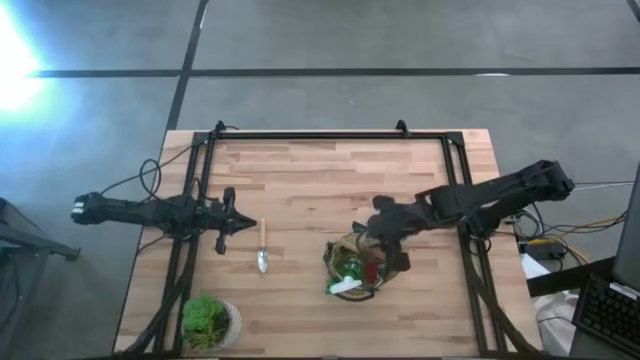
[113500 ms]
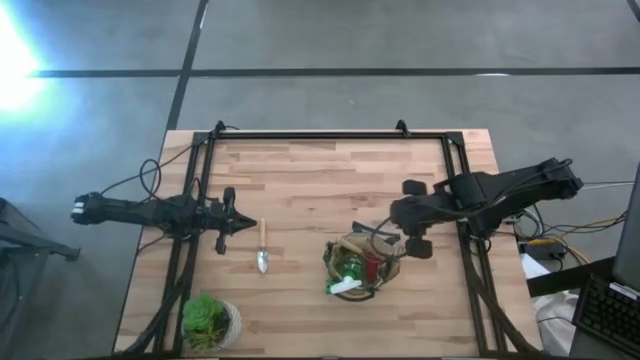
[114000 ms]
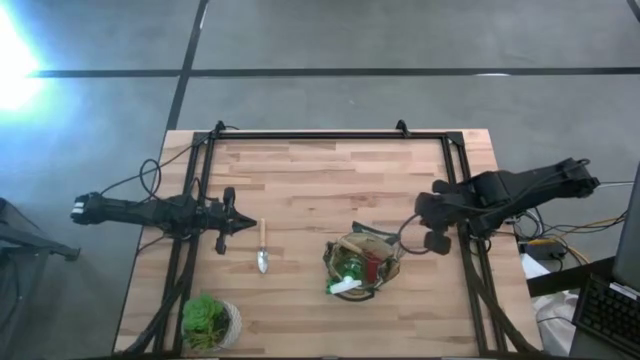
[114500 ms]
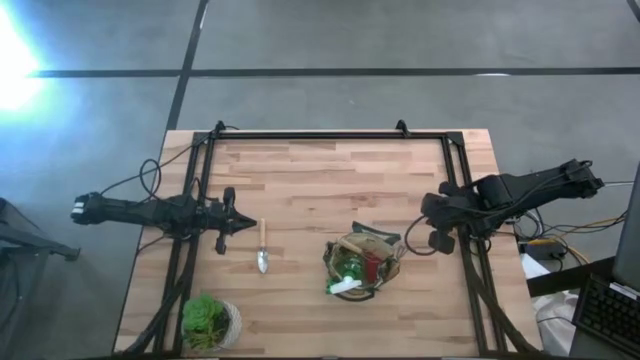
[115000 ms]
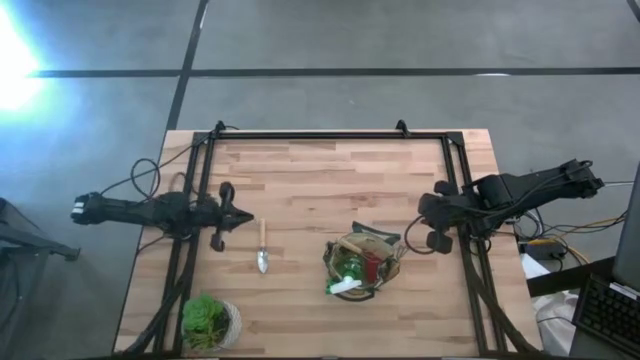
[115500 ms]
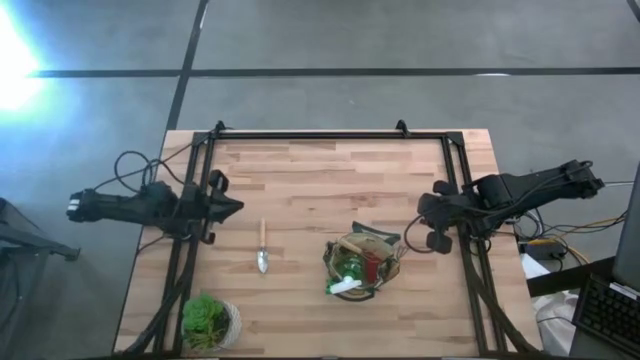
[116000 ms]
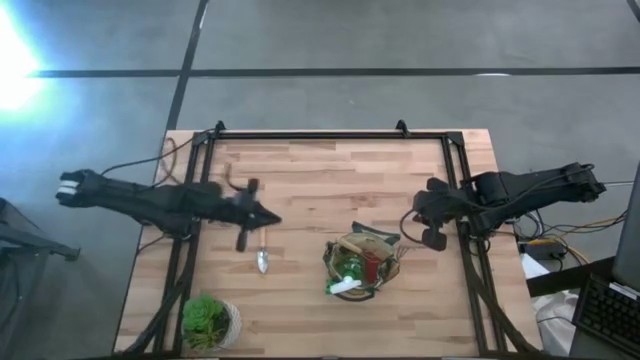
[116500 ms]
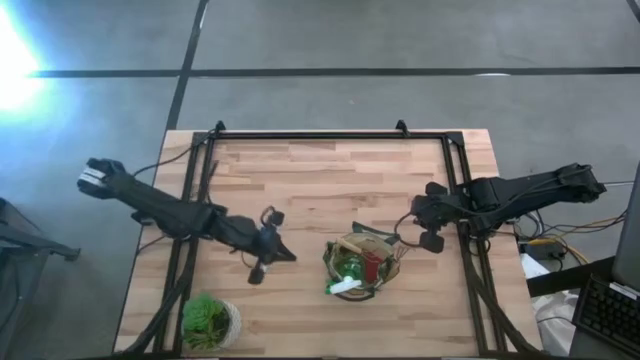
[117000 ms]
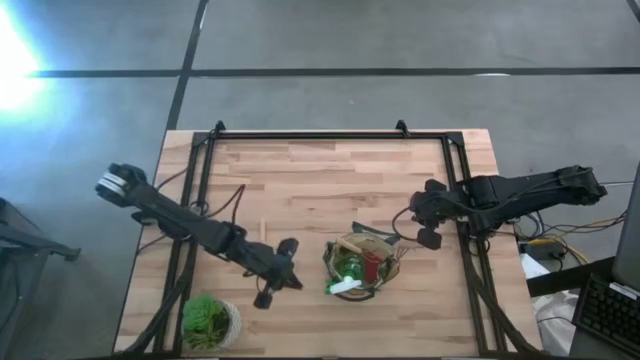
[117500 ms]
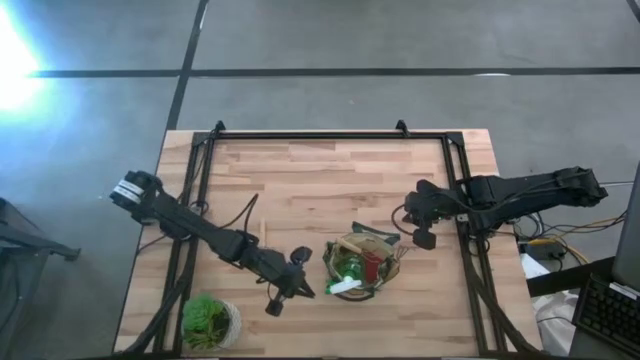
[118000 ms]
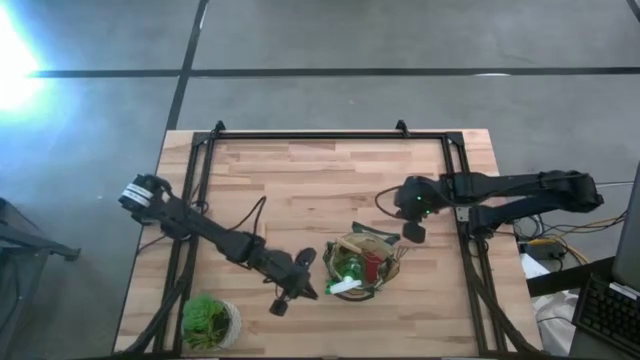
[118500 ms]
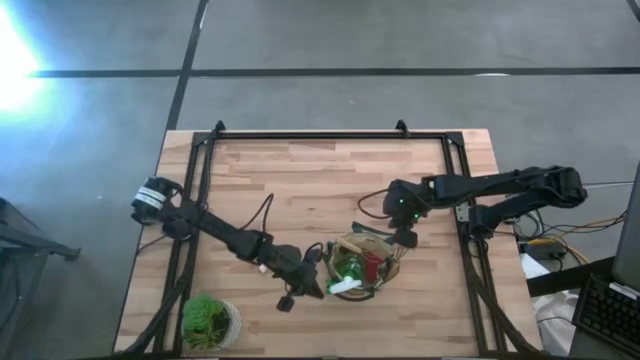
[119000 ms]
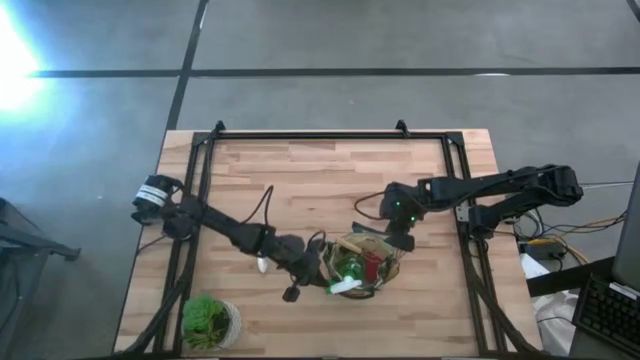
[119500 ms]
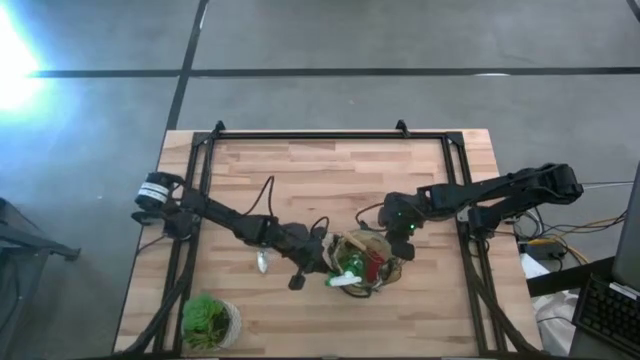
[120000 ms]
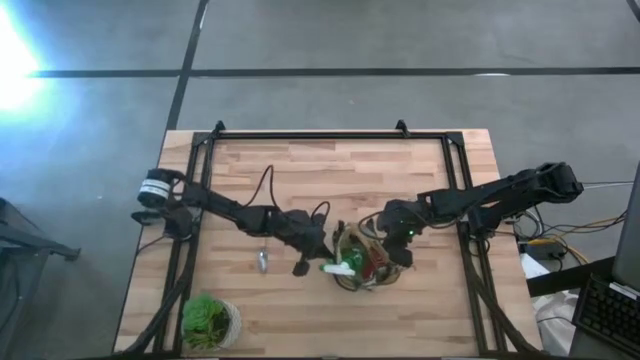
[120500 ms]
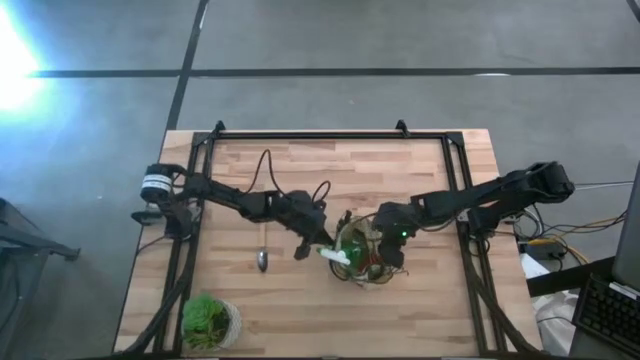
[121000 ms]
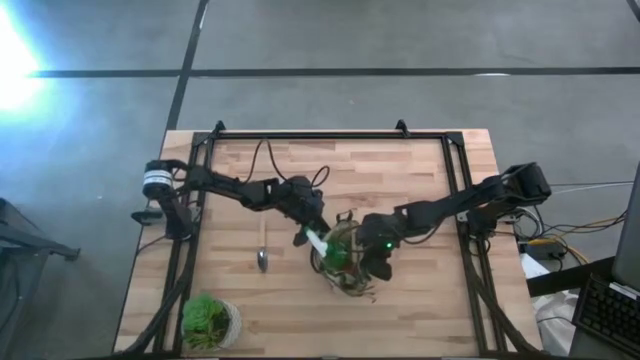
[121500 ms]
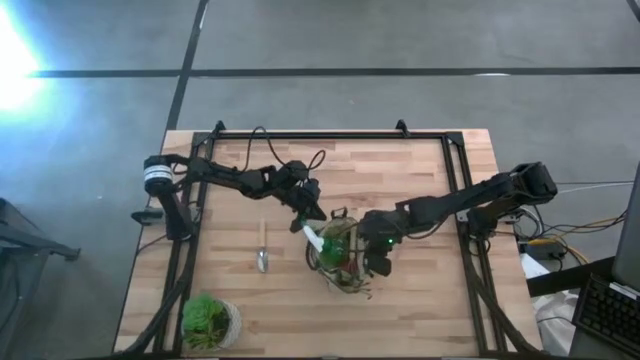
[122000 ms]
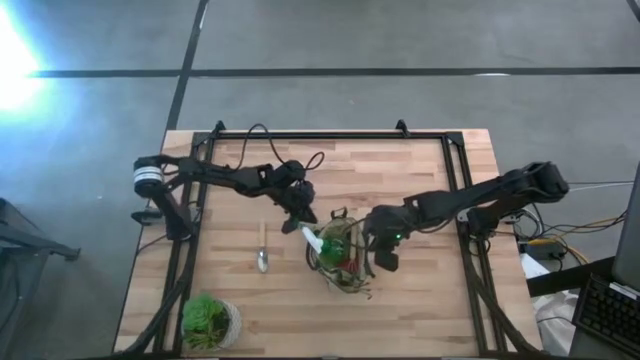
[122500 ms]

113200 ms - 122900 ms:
Task: Pick & Place Garden tools in Gardening bag
Adjust the gardening bag

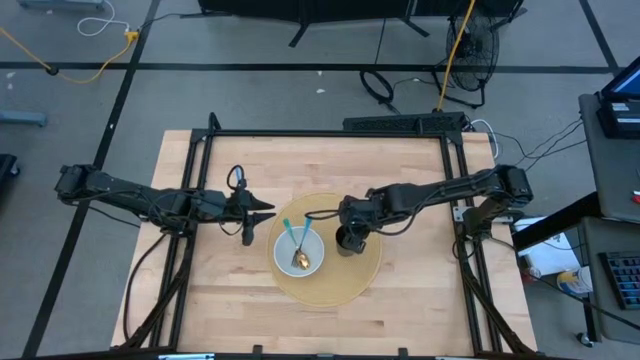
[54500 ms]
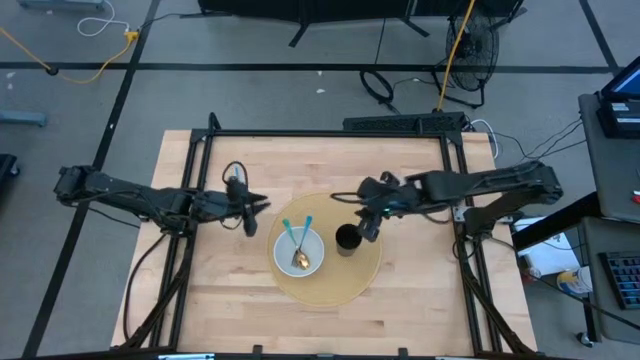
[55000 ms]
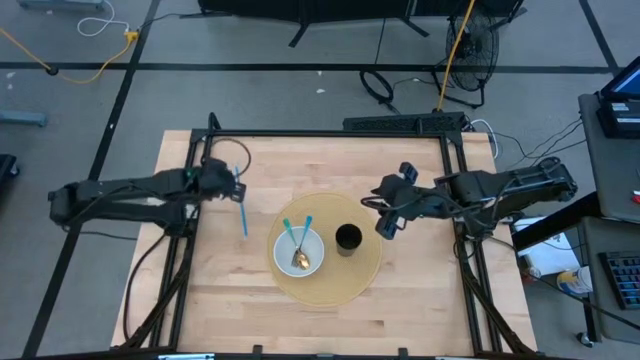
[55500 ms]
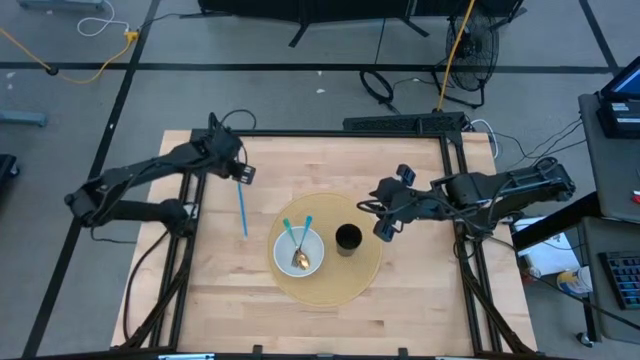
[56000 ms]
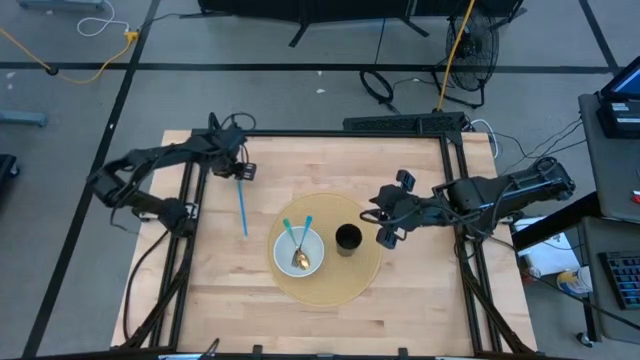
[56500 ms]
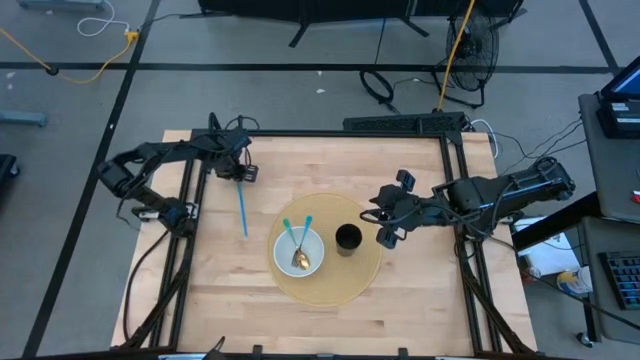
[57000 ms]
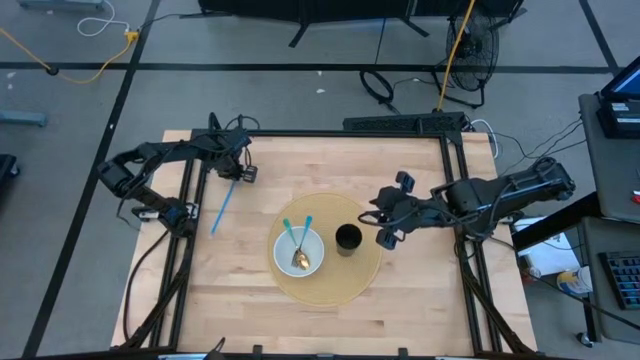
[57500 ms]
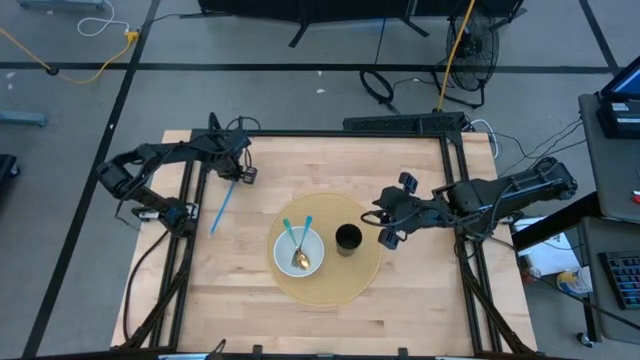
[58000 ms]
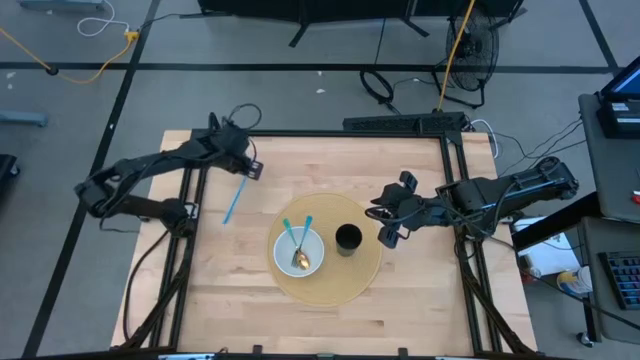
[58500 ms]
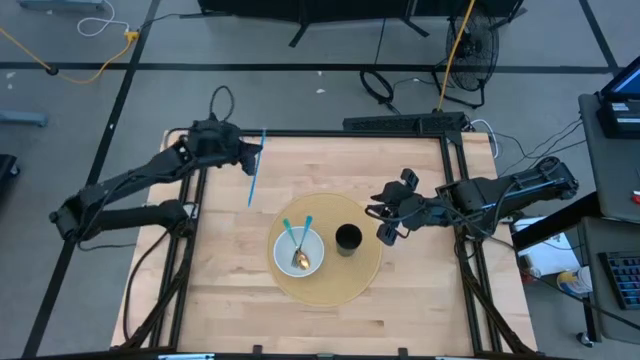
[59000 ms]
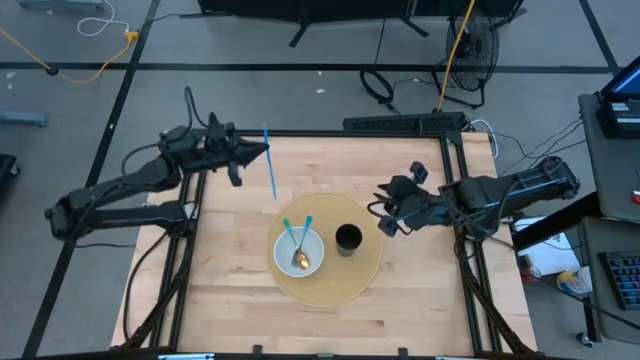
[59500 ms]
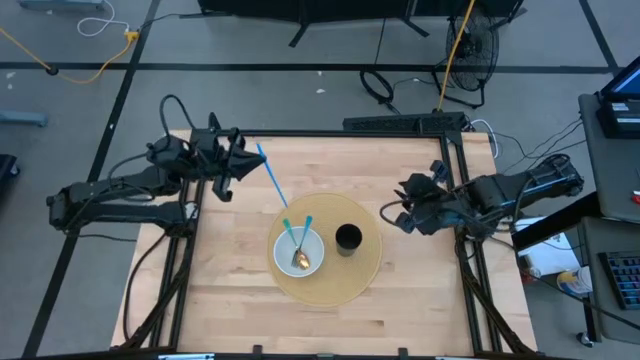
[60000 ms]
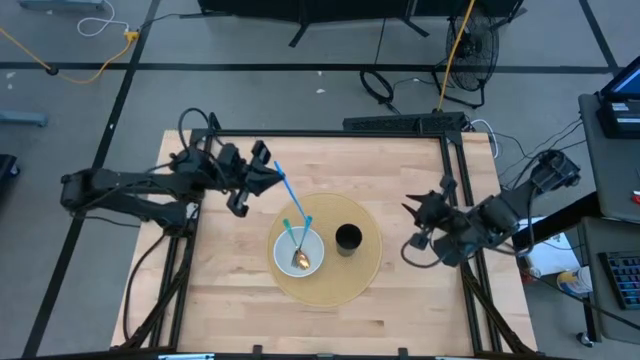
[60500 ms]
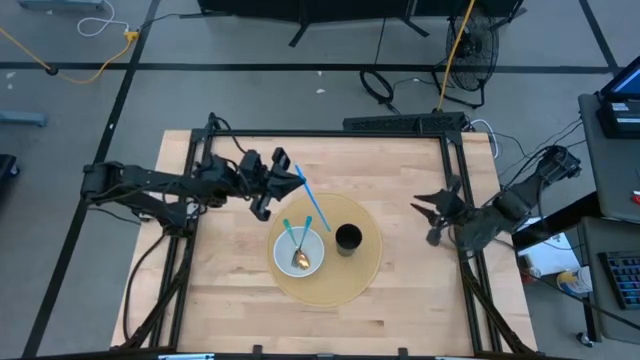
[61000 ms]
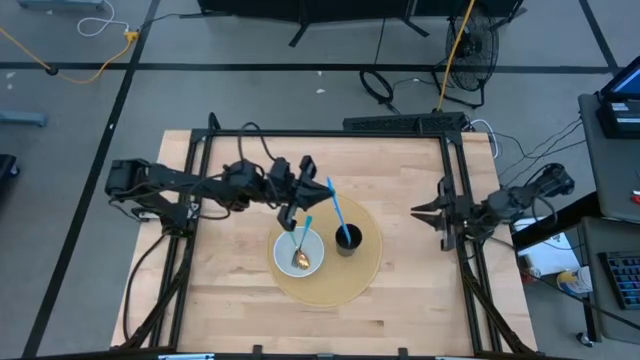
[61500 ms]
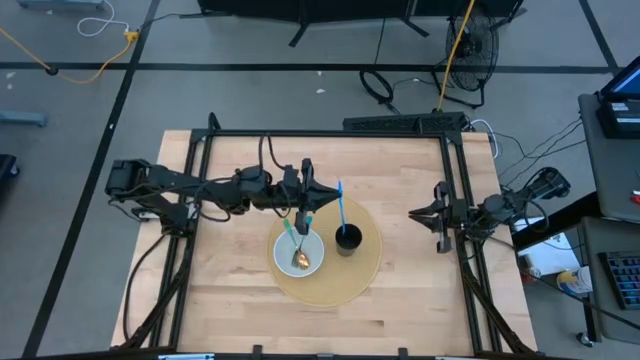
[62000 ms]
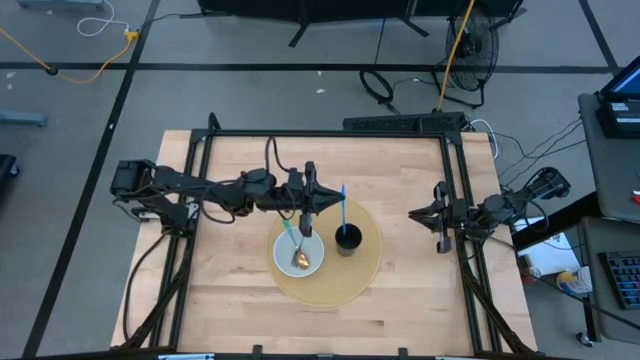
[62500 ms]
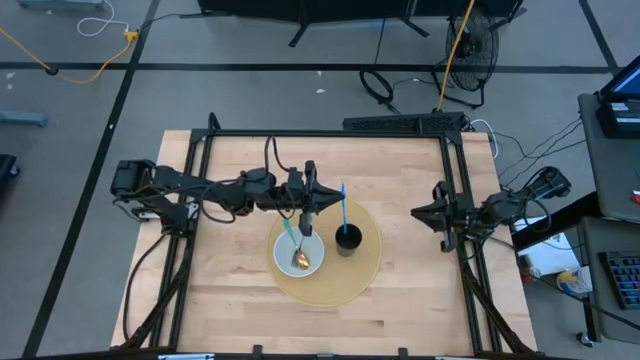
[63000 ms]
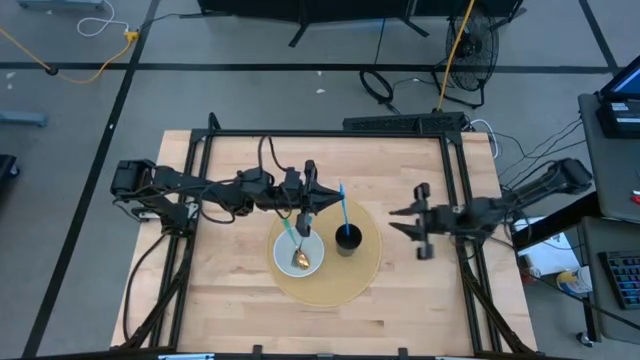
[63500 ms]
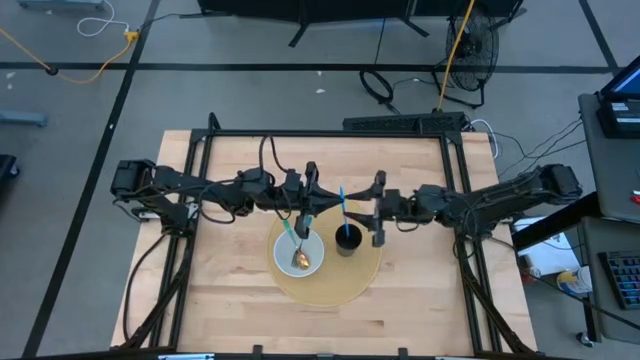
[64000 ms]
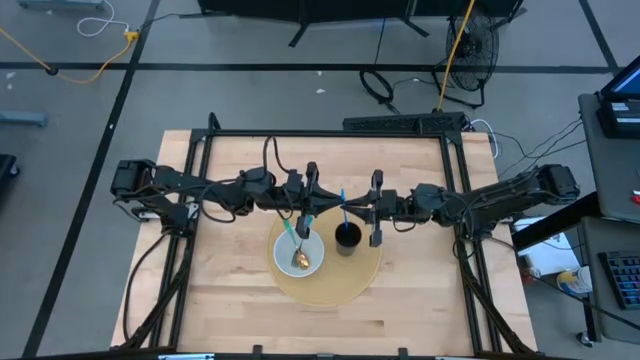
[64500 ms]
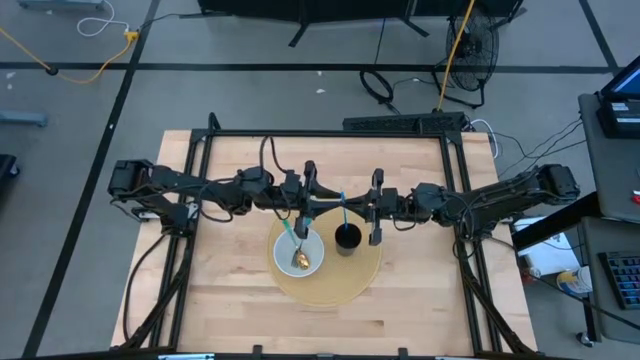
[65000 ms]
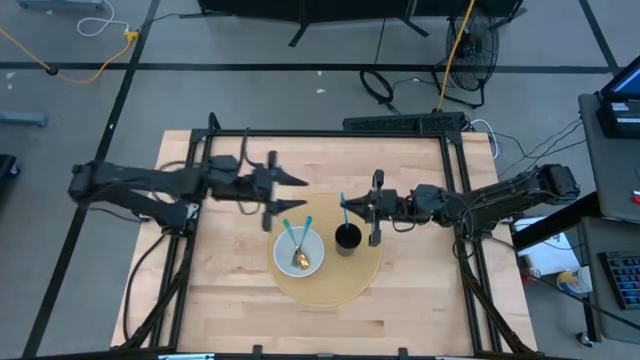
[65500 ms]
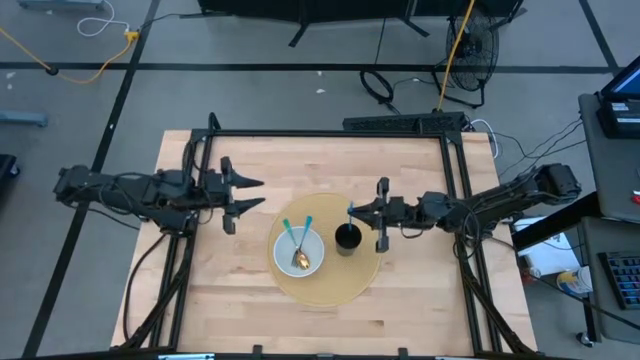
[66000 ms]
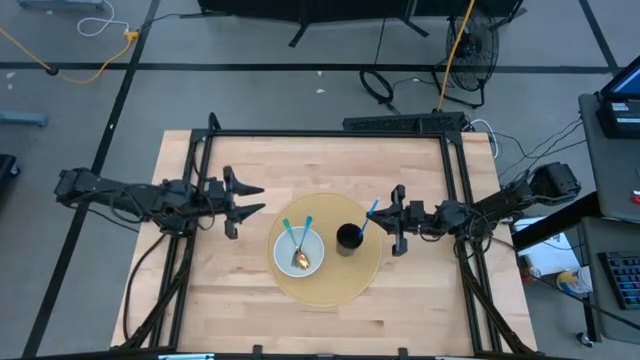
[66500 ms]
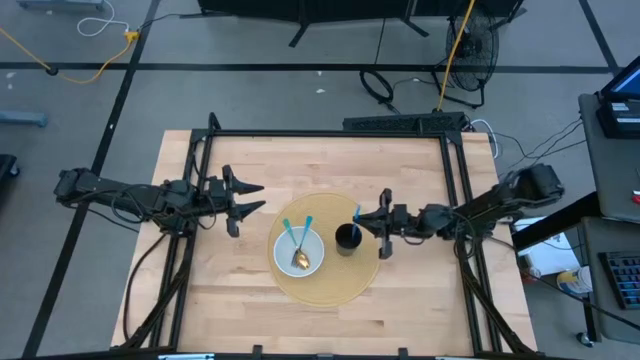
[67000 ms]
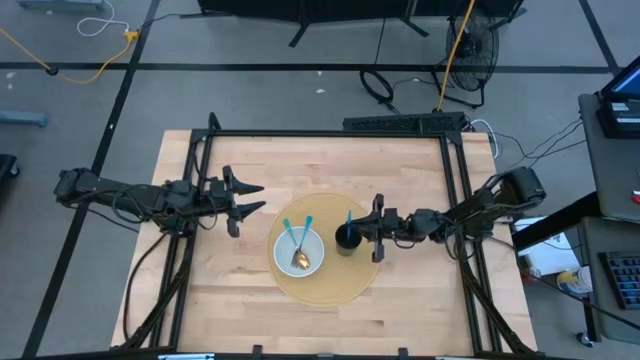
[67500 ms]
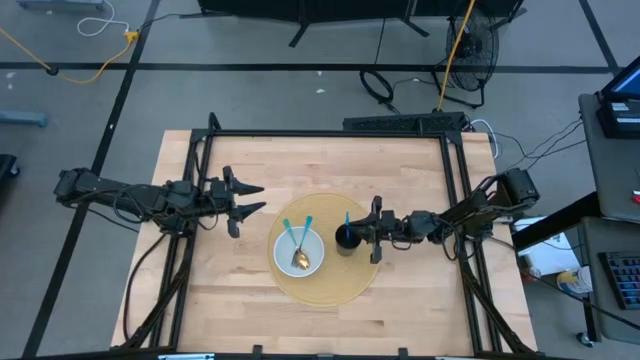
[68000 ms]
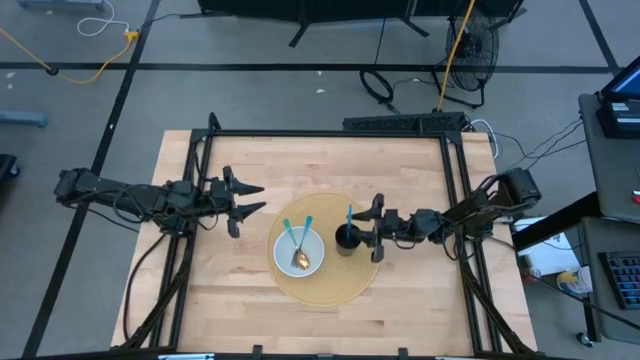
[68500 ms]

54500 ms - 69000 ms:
Task: Pick & Place Utensil
Put the blue straw into the black cup on the brown mat
